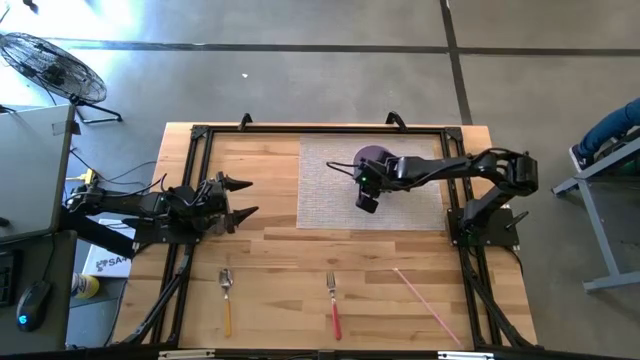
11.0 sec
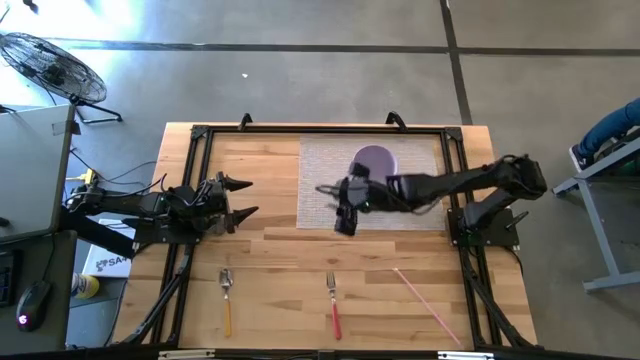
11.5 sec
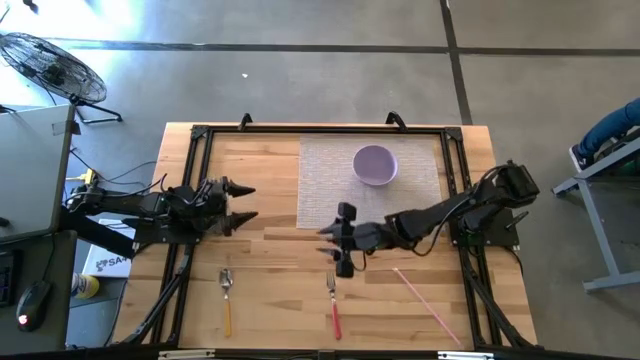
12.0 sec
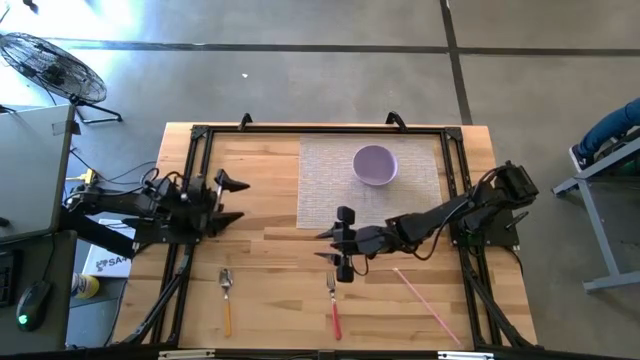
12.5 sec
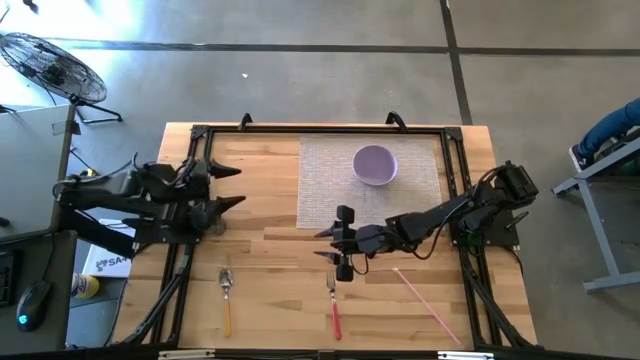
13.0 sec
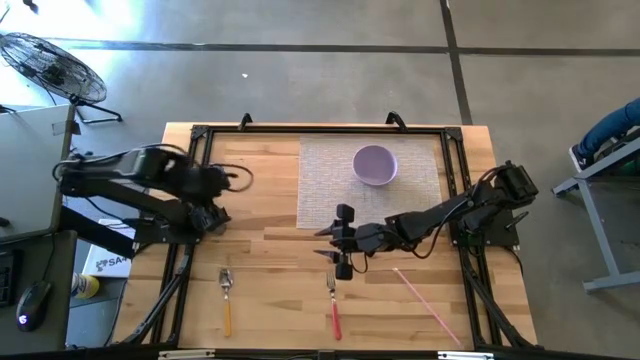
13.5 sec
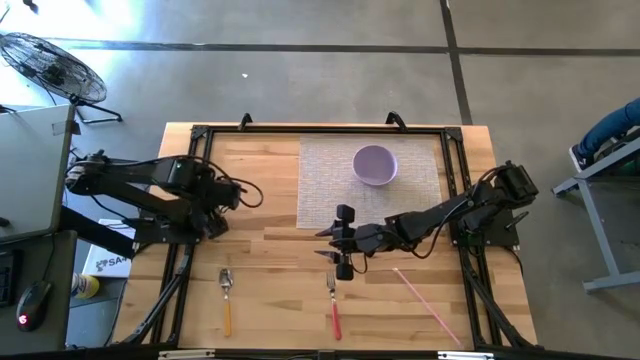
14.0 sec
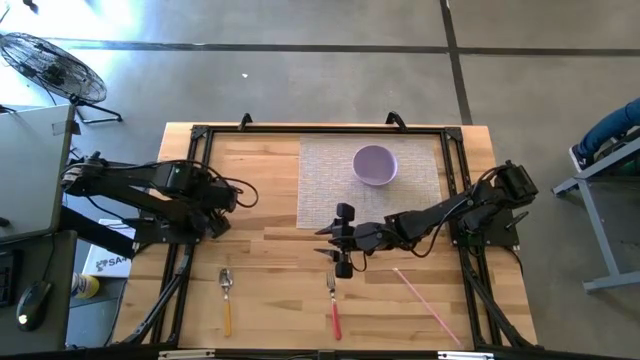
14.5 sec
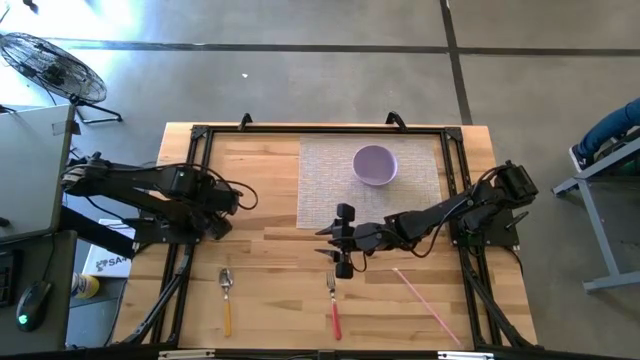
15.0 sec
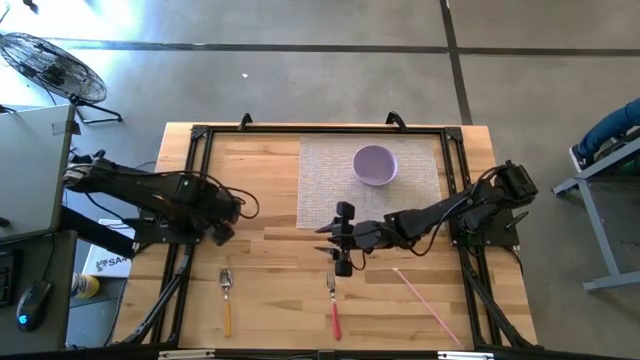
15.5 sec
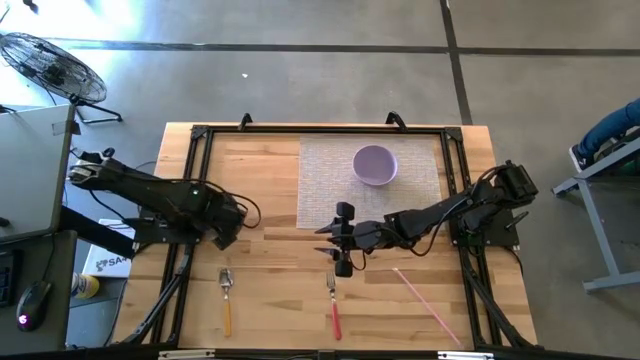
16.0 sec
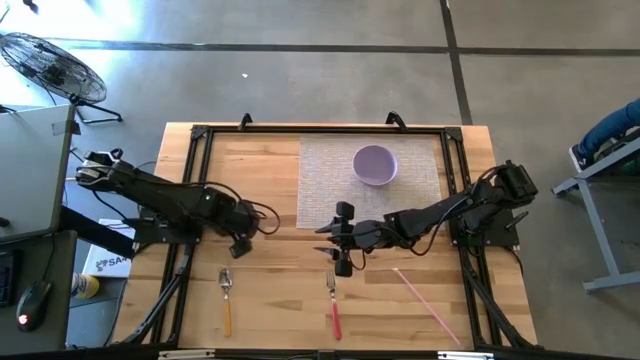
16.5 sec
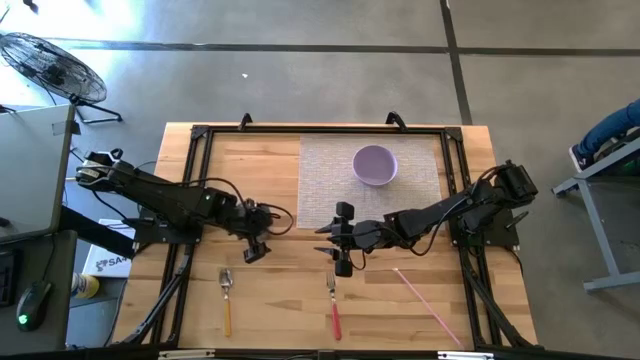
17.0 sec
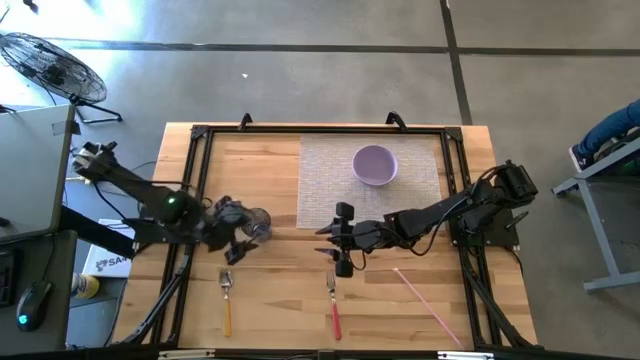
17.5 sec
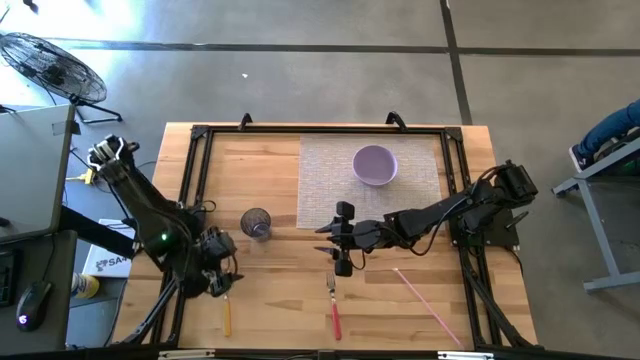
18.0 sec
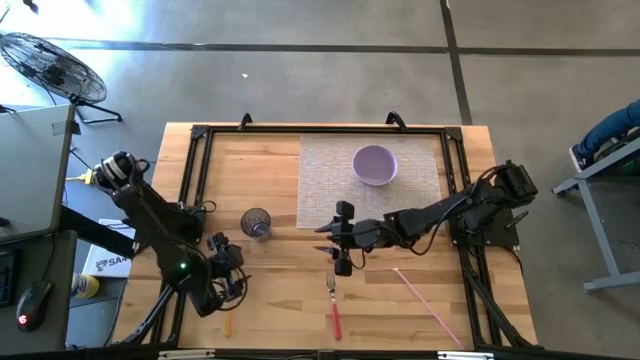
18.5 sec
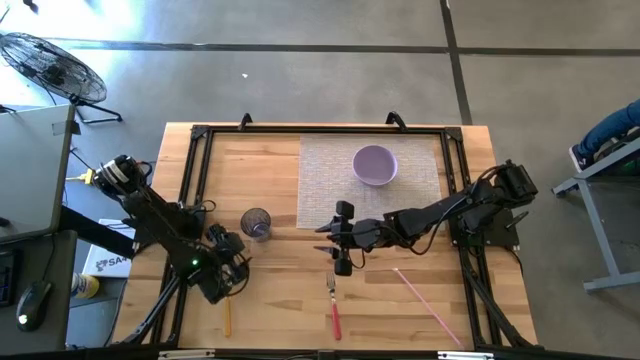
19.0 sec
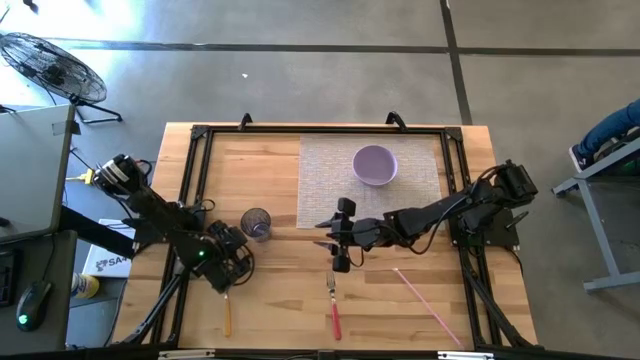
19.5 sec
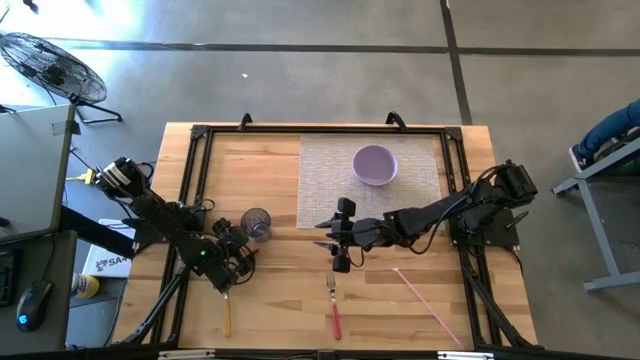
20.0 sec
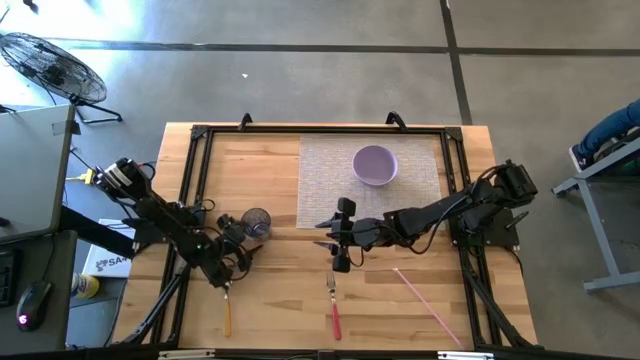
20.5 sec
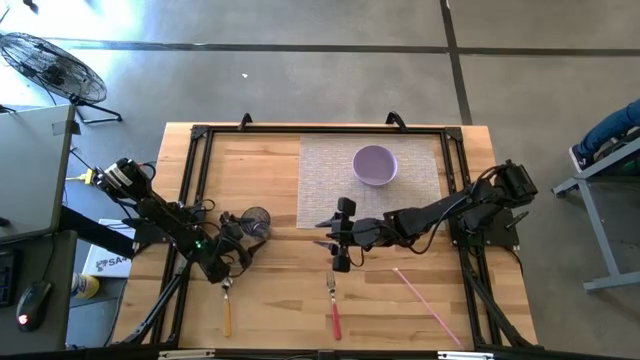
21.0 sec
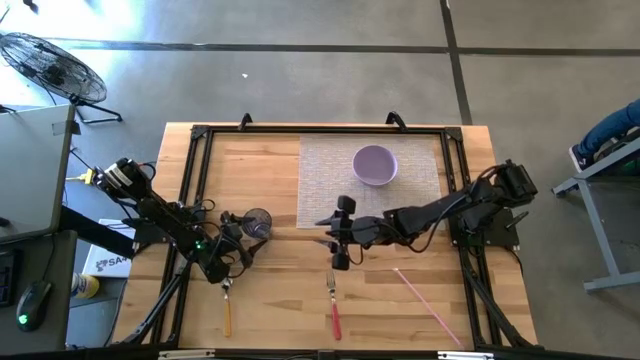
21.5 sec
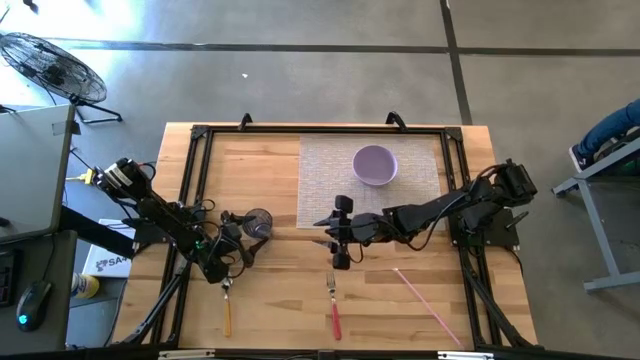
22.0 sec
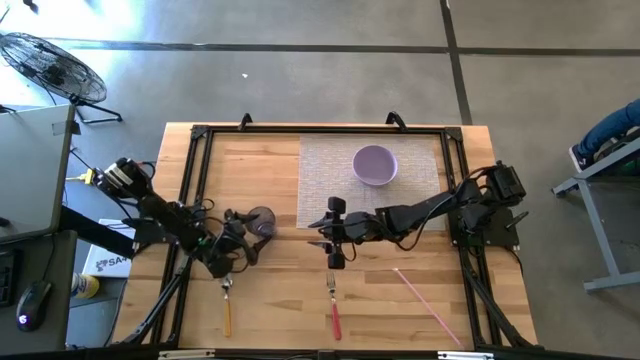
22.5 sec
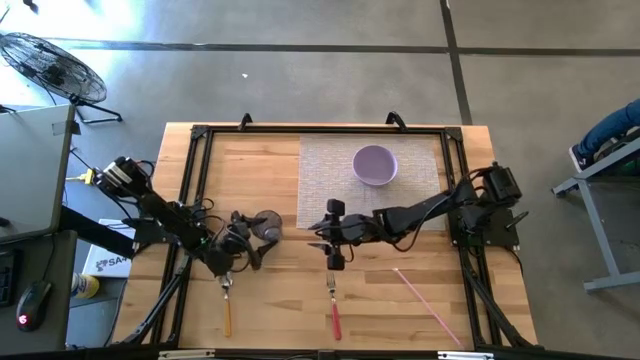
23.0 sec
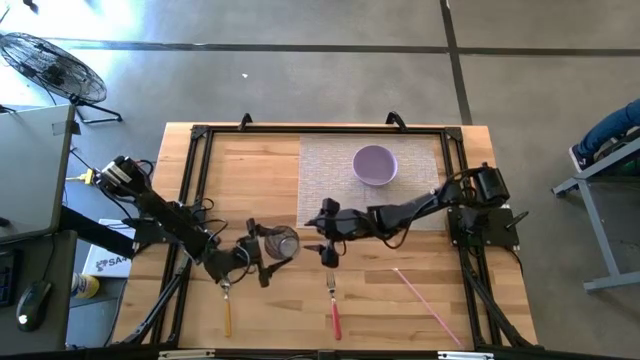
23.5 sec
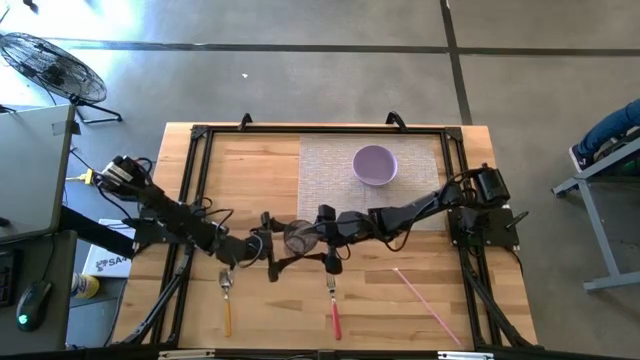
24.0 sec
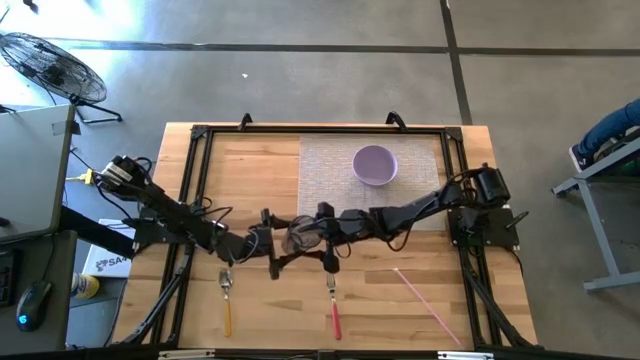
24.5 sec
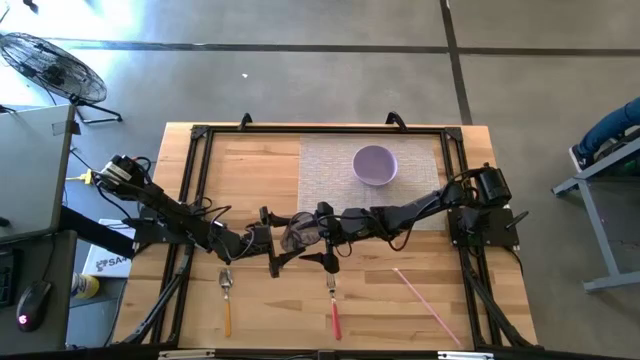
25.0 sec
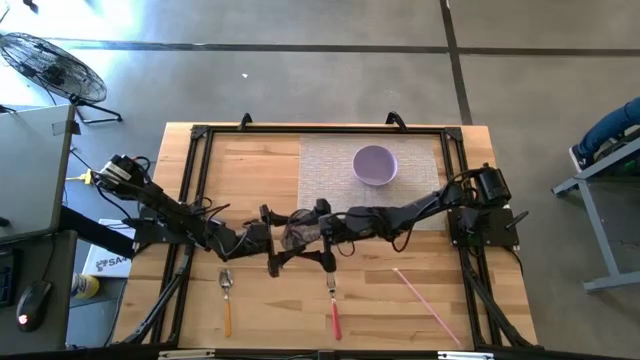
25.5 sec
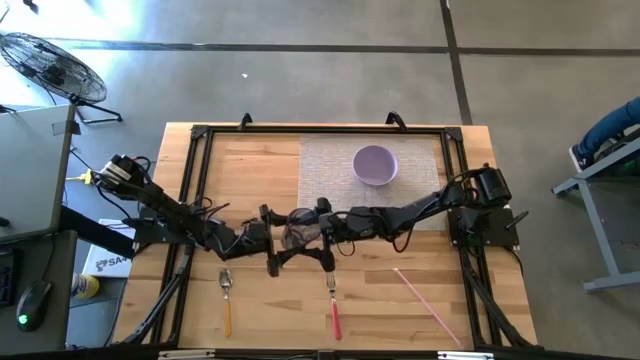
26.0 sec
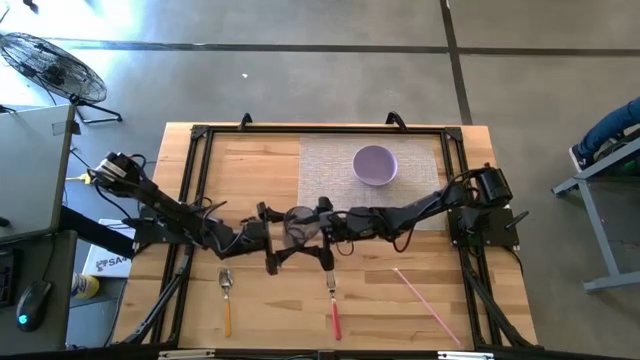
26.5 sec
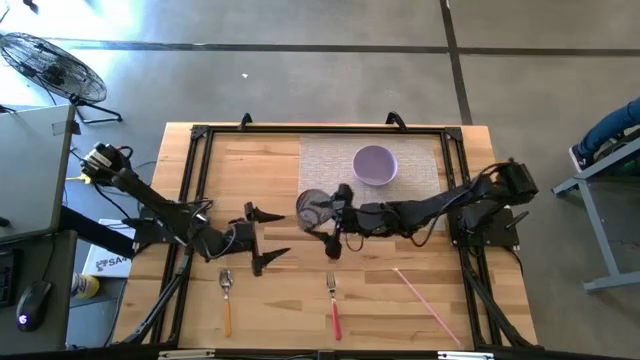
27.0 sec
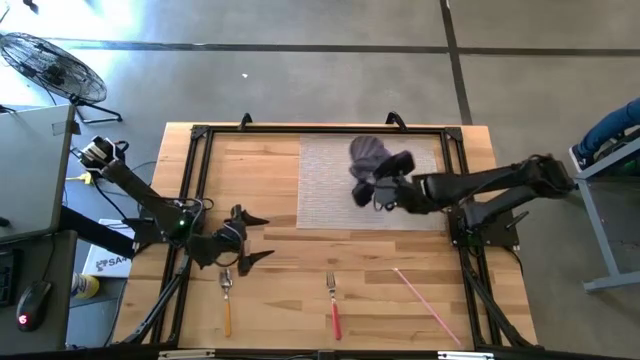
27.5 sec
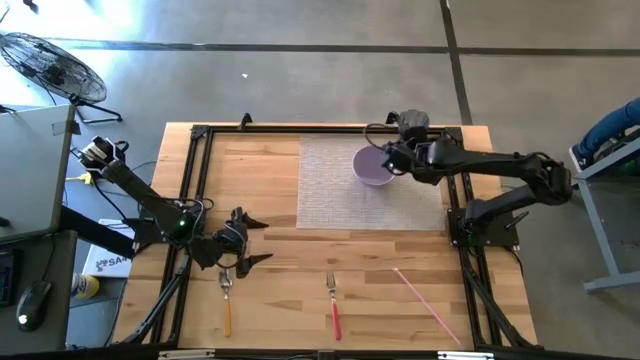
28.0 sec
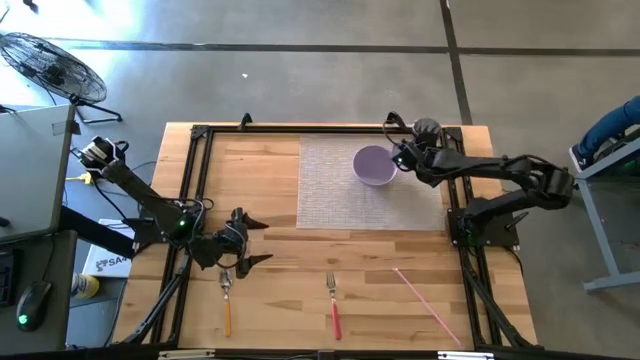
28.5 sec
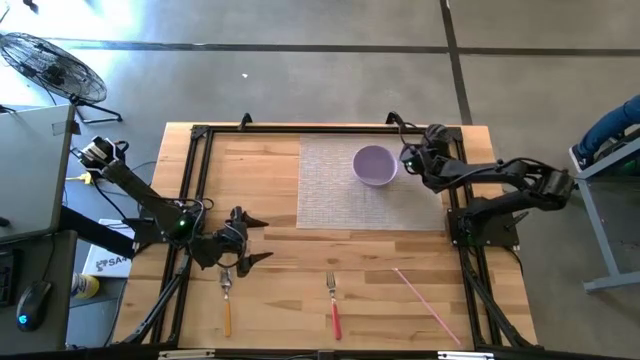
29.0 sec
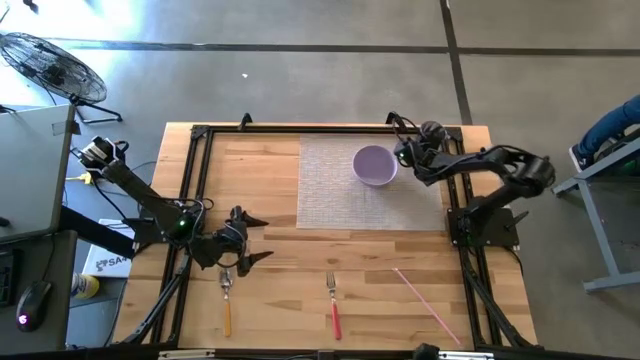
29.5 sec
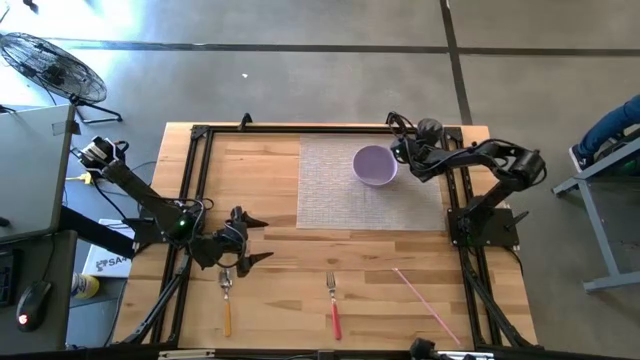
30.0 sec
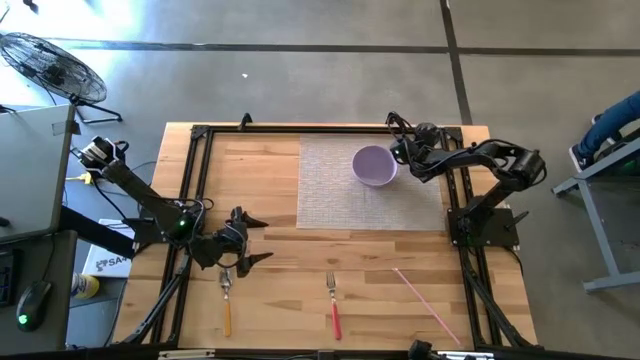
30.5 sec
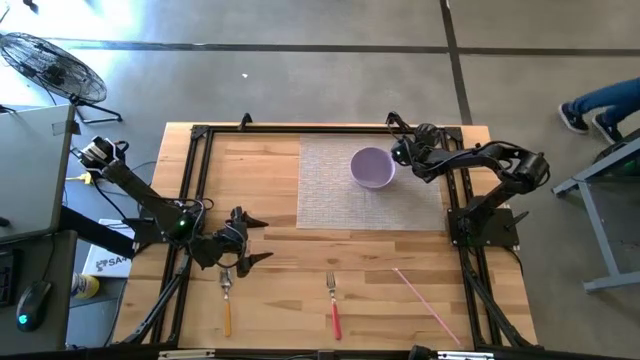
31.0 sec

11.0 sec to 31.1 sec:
Task: Pick & Place Utensil
Put the black cup to the top right of the bowl on the mat
